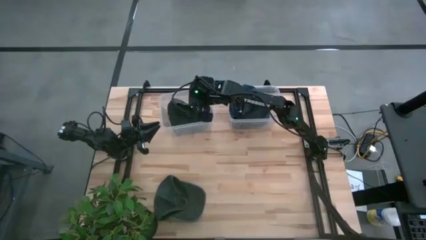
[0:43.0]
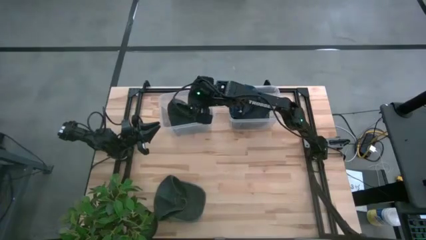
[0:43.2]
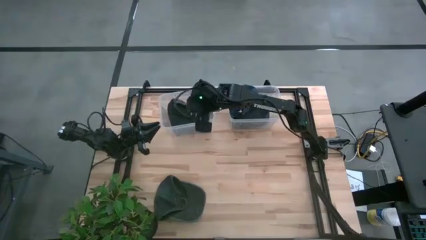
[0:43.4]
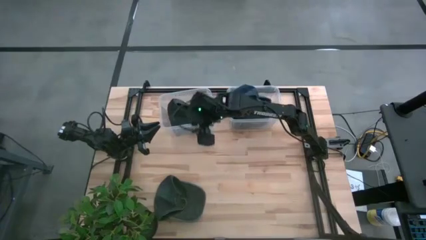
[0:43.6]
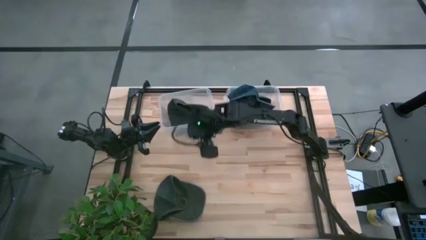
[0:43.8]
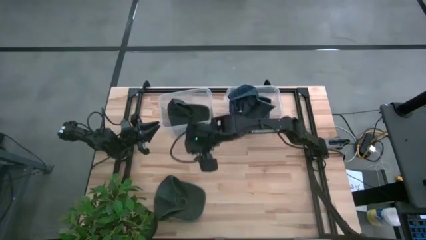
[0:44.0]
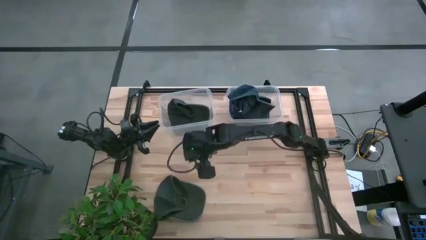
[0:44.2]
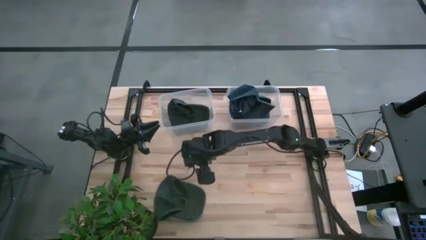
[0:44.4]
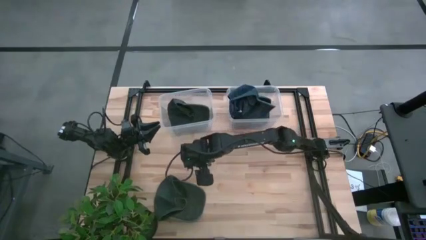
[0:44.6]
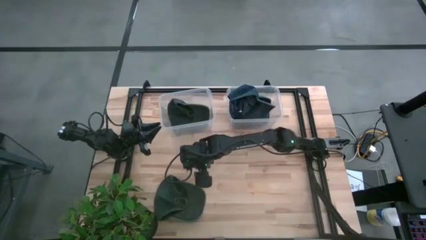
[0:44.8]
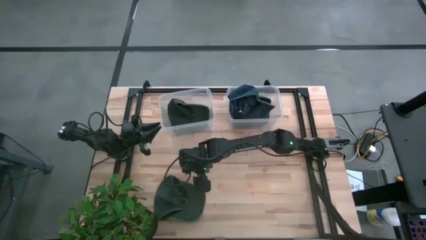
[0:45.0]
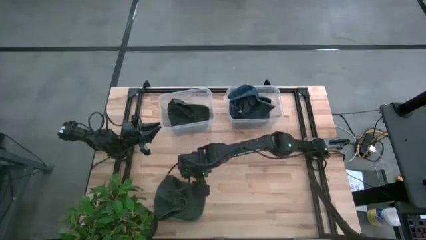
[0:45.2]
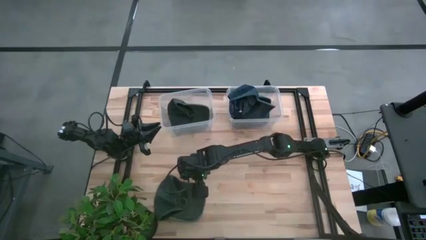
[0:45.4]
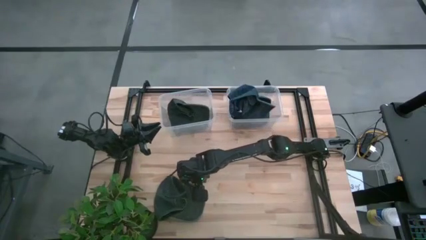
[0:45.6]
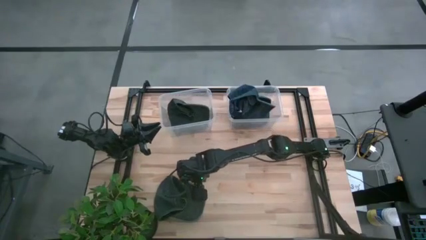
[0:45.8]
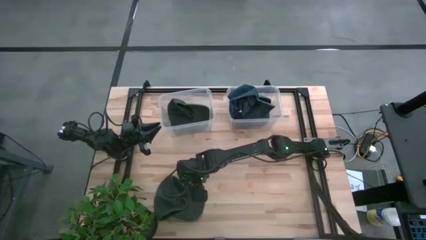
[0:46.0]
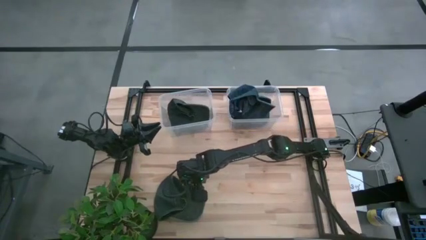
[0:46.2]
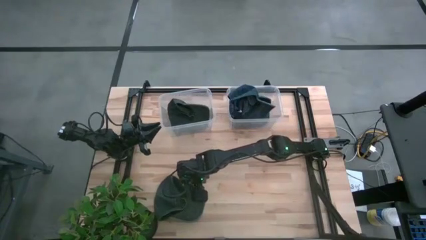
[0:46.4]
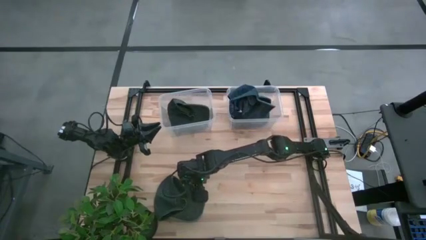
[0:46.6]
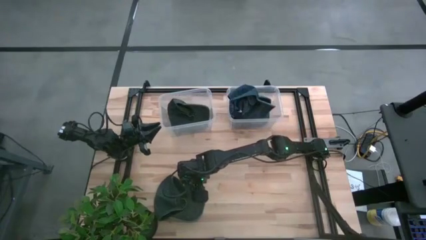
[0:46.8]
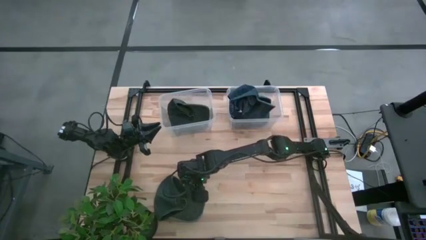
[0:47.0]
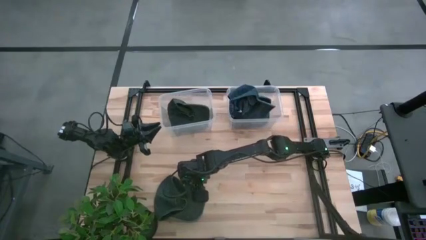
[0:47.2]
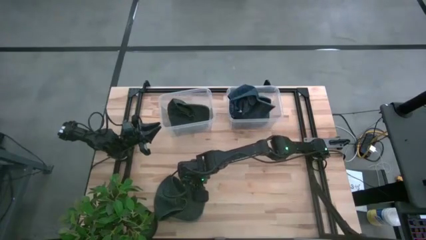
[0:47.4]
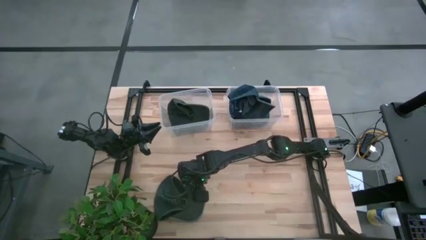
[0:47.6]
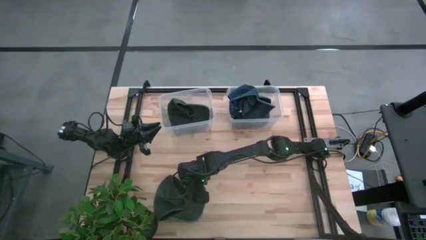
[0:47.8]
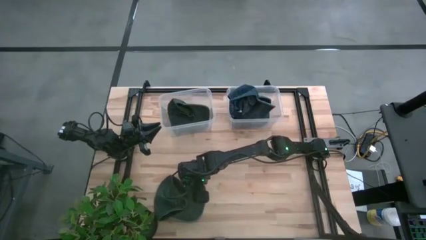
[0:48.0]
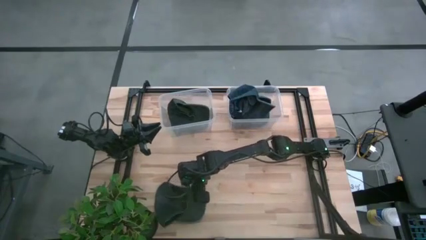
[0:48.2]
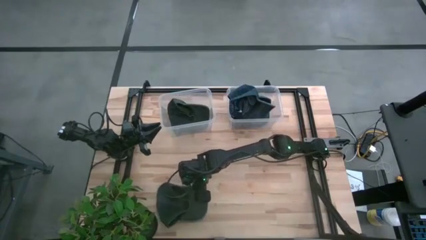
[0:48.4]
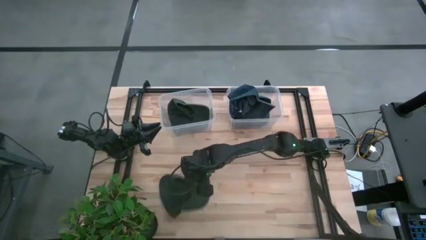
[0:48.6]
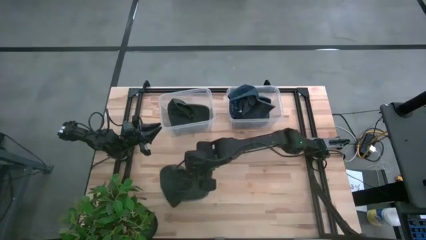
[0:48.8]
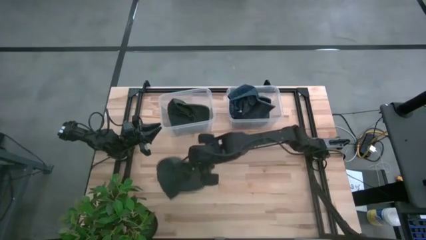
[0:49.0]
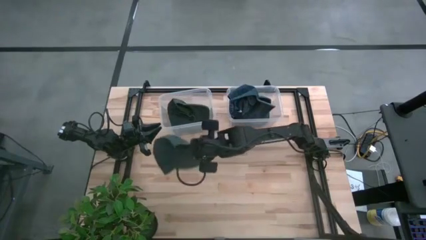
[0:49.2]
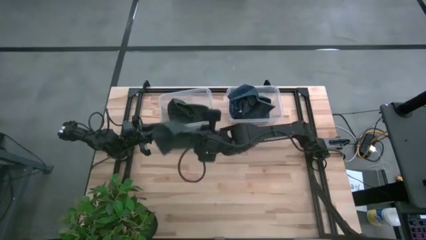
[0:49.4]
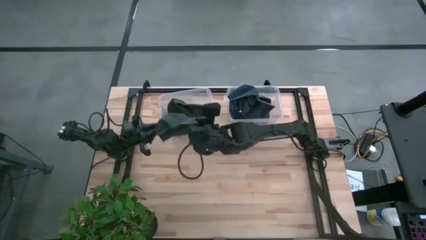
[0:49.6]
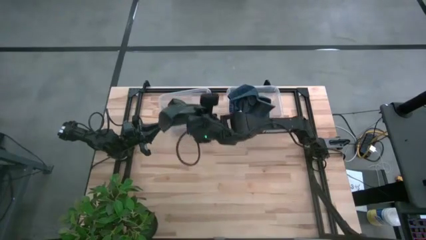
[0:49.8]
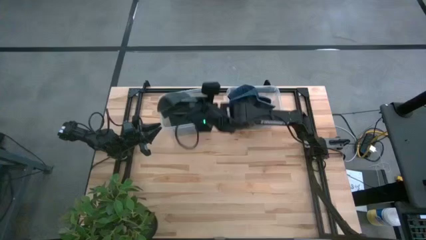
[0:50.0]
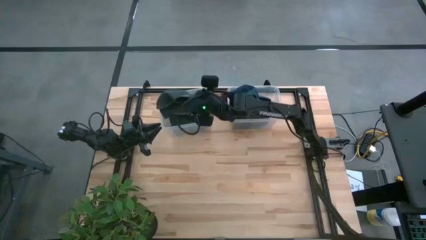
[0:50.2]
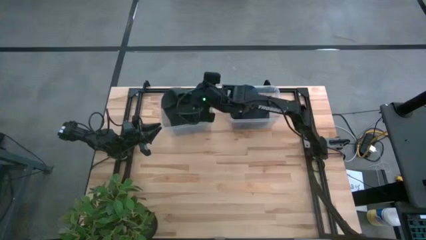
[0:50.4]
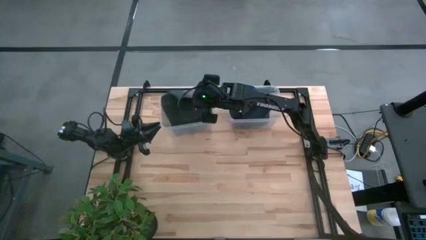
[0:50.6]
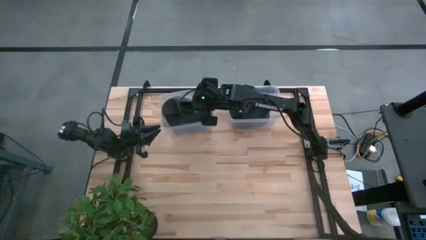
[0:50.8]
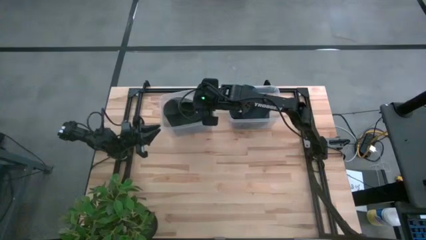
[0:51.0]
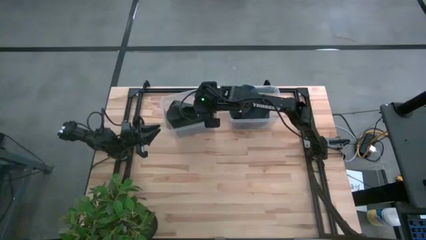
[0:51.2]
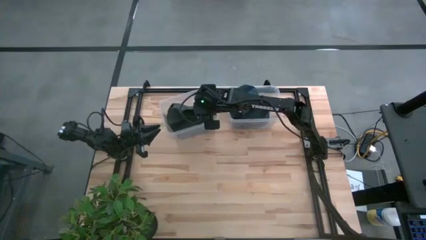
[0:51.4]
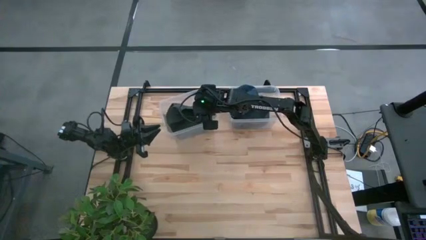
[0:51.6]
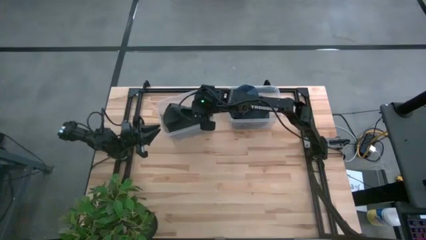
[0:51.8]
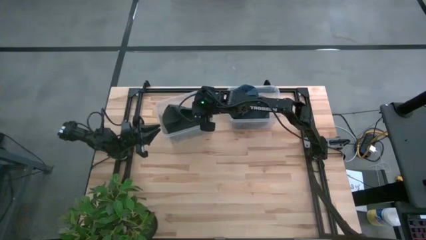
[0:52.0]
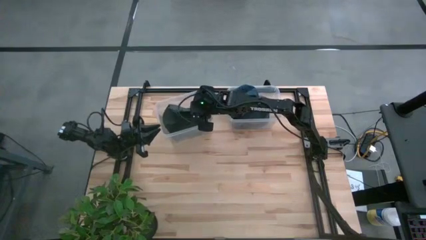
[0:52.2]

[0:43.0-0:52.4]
Task: Pick & Place hat
Put the gray cap into the left transparent bin

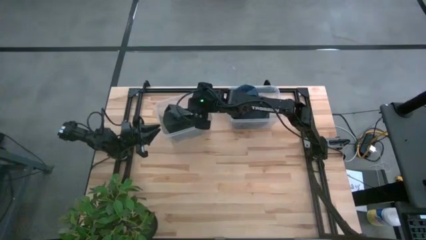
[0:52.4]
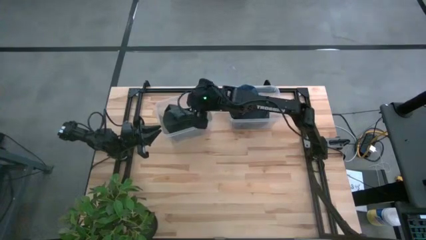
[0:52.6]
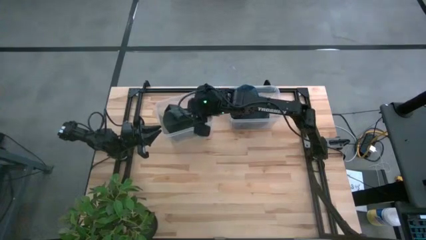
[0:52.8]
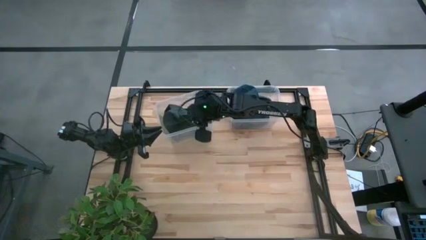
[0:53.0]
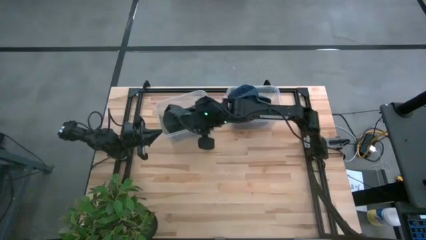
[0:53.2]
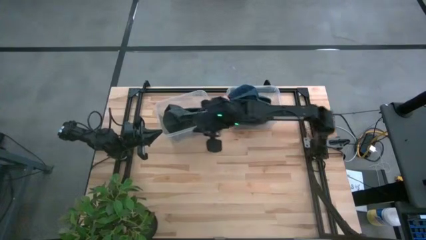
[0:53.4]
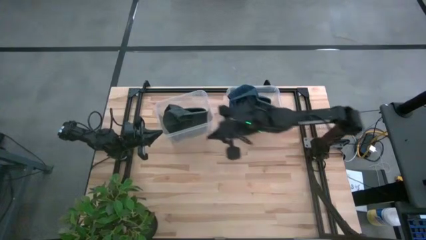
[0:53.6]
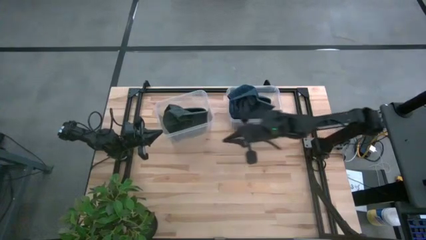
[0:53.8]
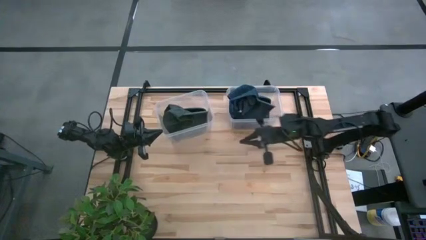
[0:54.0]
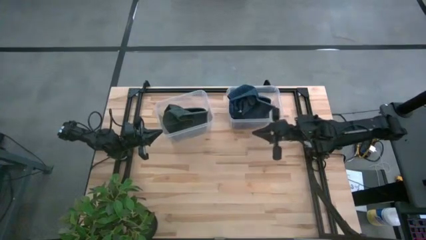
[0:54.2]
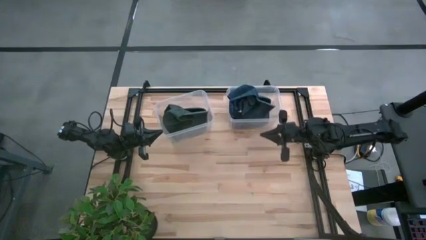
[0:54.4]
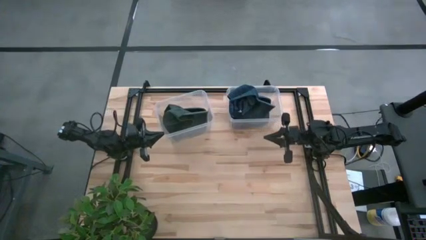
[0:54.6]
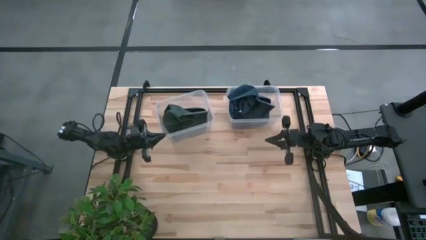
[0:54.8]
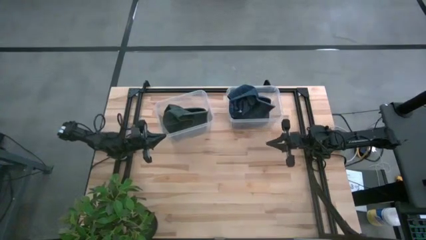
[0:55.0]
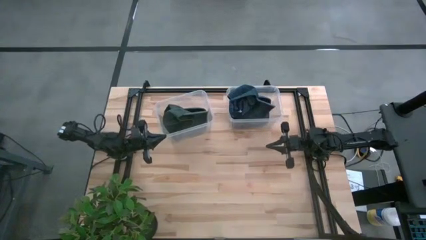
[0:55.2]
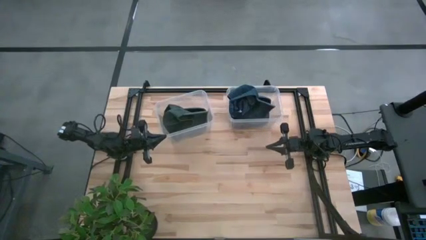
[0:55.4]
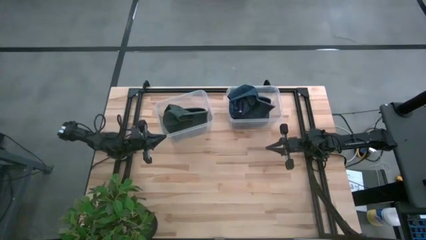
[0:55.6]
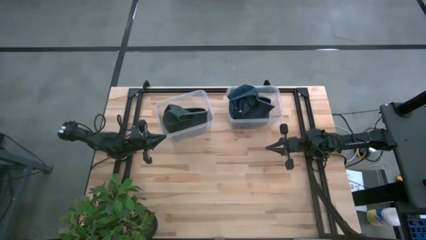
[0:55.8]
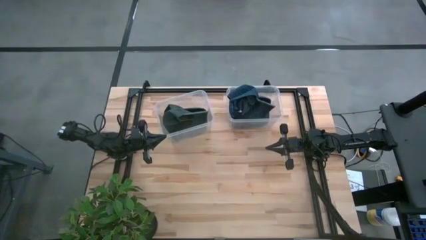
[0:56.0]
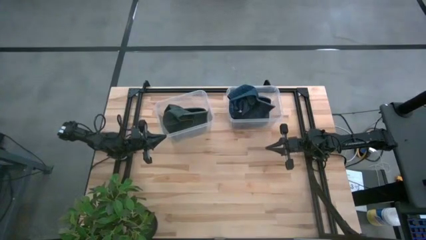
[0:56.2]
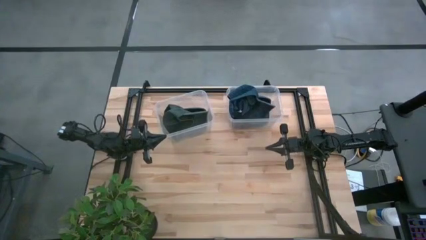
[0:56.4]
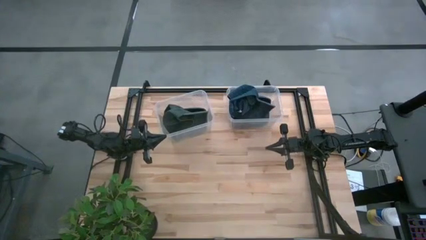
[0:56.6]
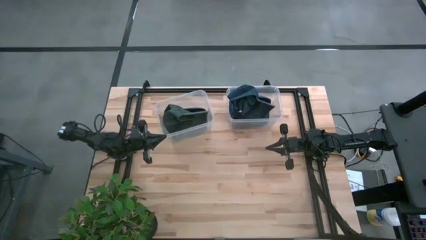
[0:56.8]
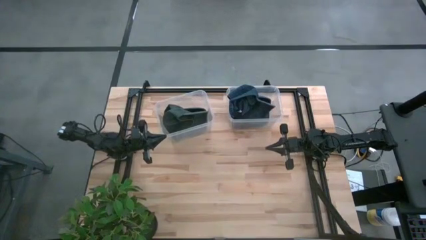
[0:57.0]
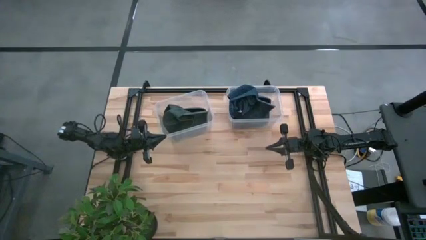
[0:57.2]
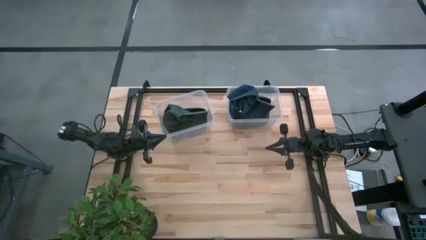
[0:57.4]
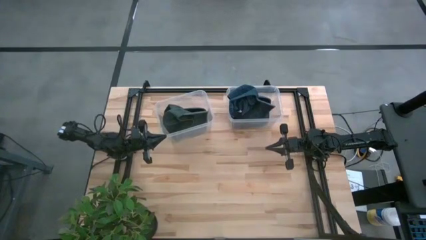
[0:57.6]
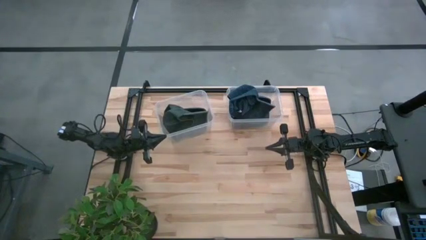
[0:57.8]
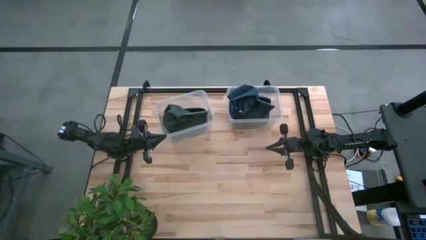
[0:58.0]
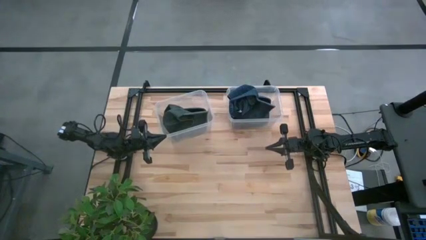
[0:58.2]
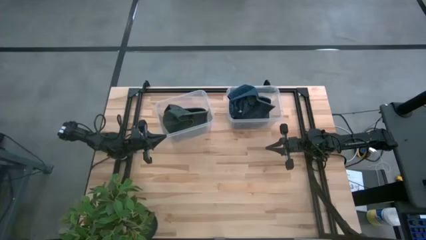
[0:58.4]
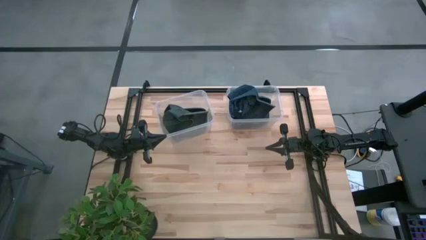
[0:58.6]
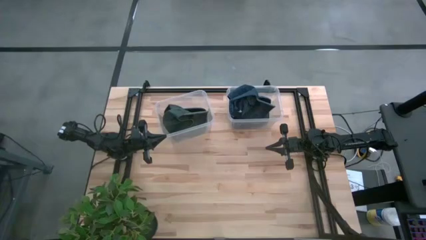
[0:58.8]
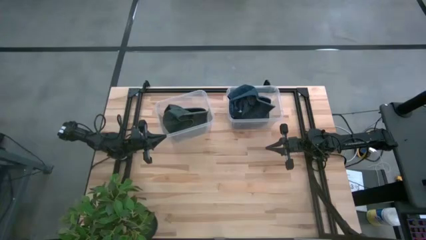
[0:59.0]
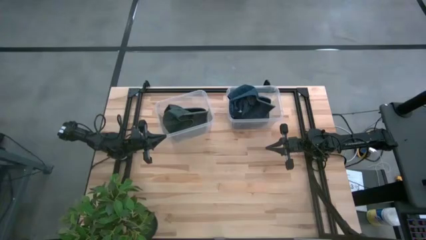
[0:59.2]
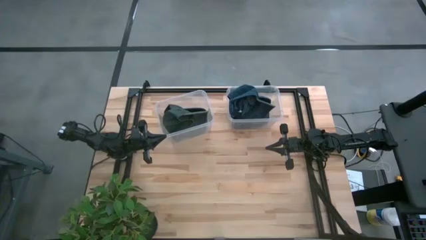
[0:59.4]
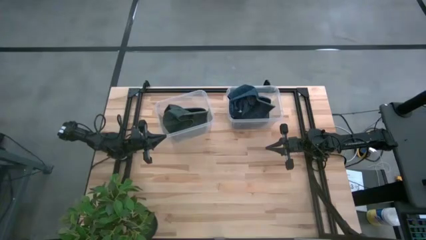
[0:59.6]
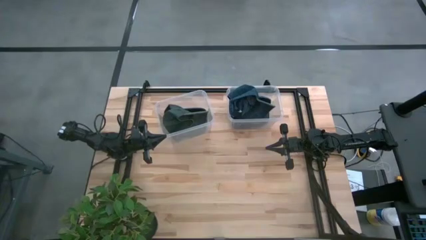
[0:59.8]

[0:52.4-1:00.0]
Return to Home Position
